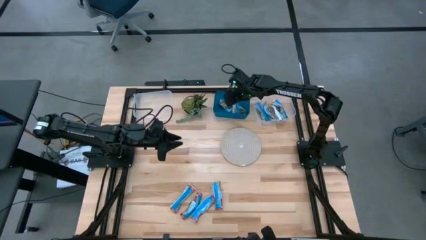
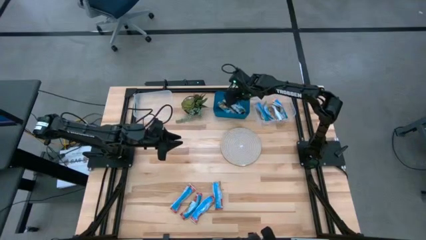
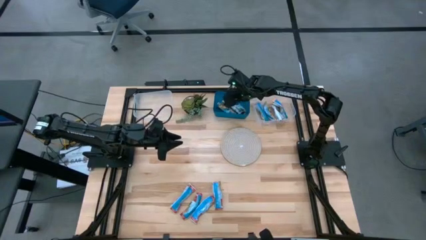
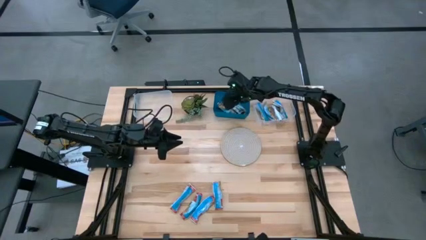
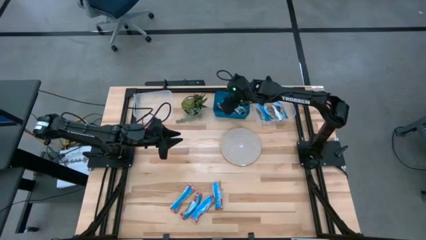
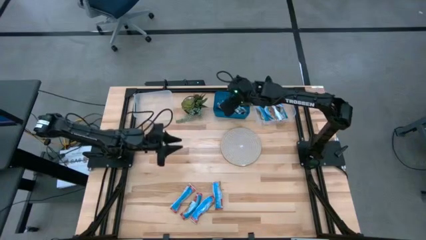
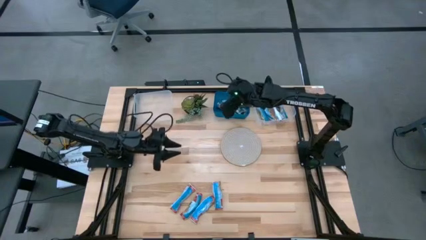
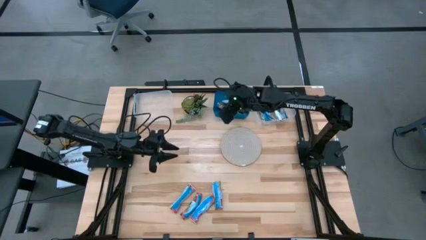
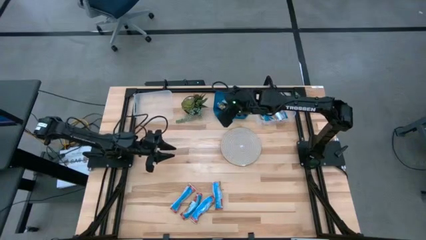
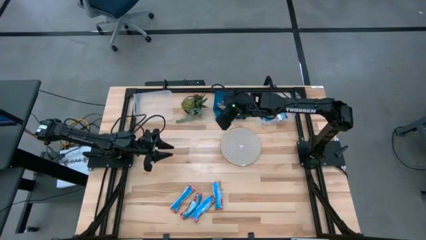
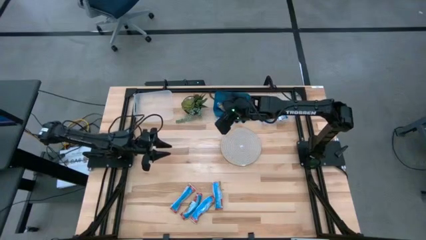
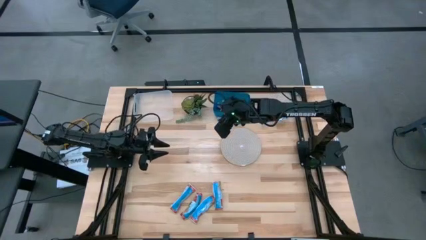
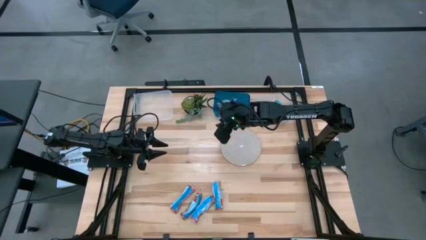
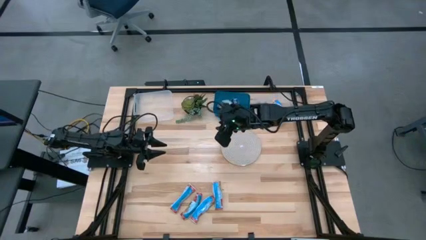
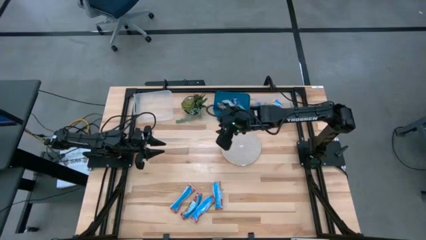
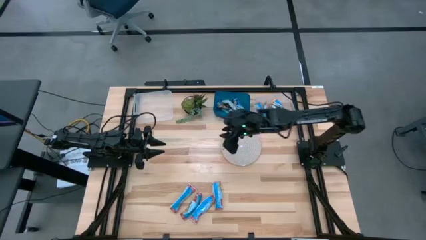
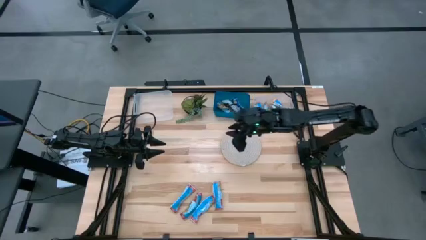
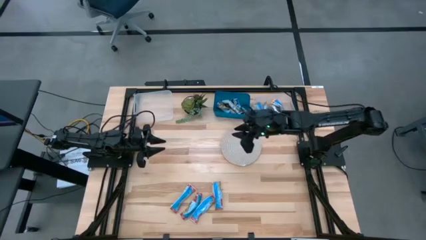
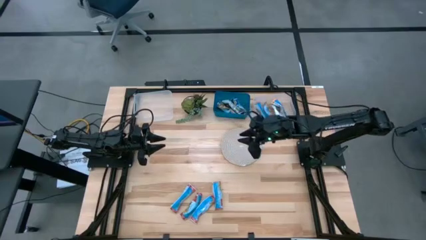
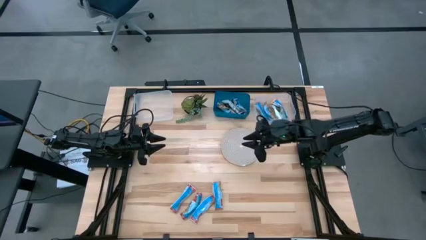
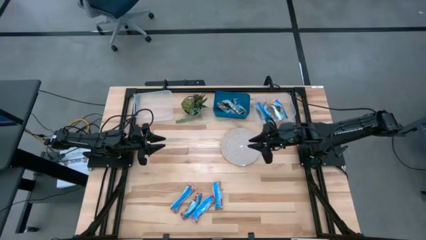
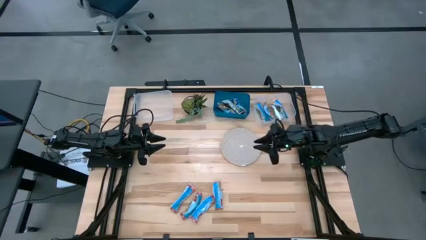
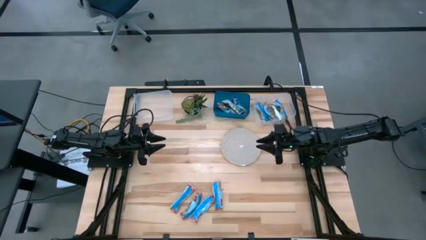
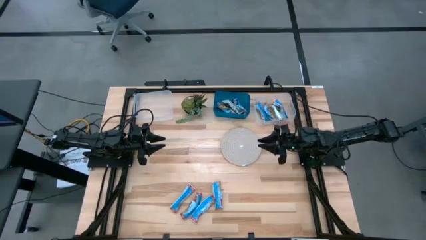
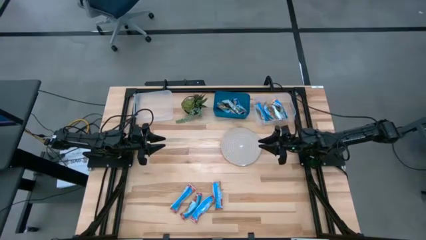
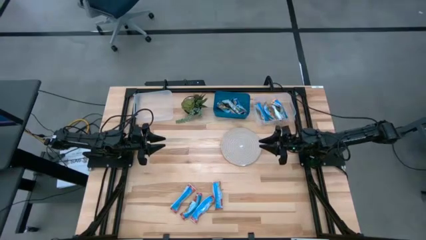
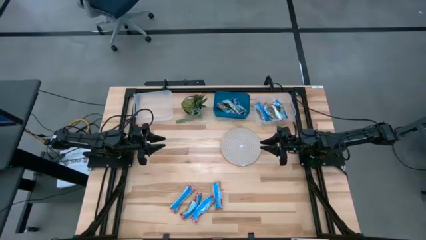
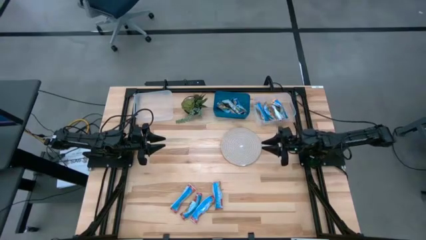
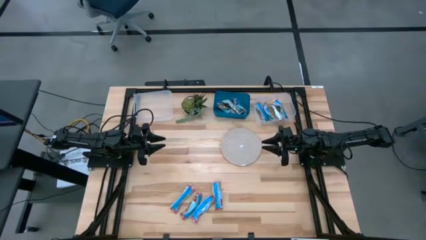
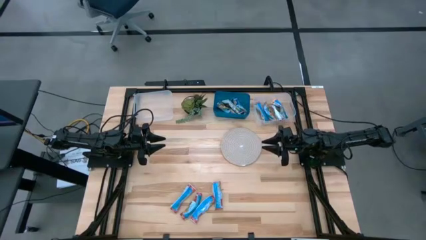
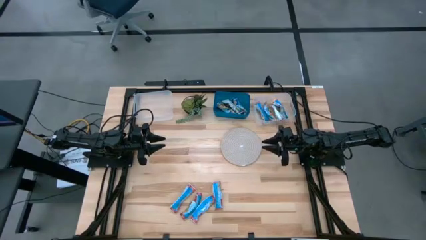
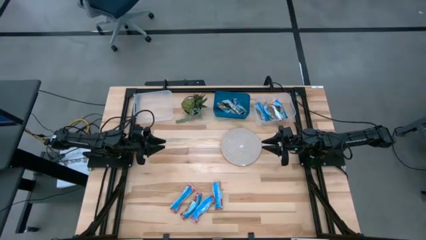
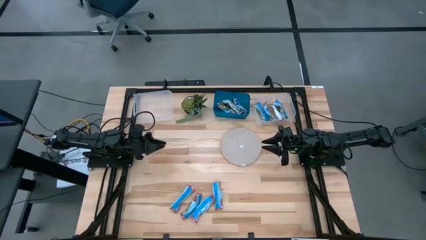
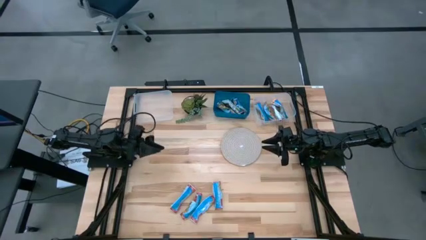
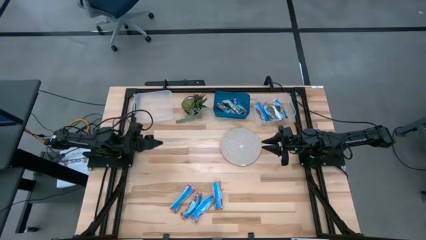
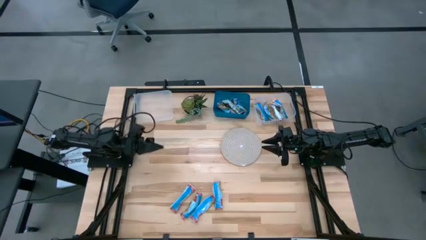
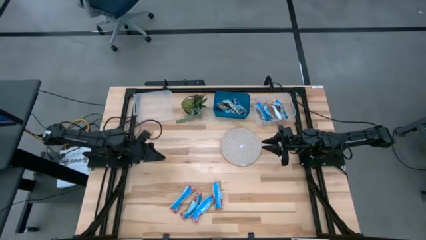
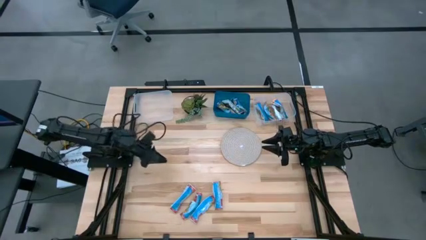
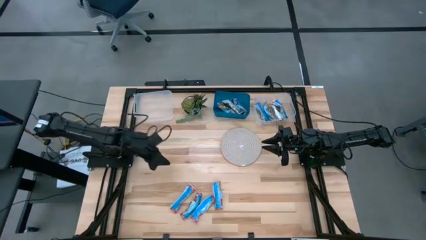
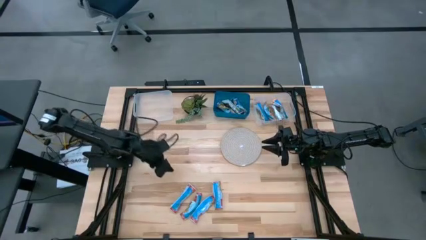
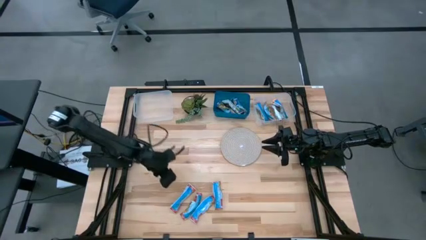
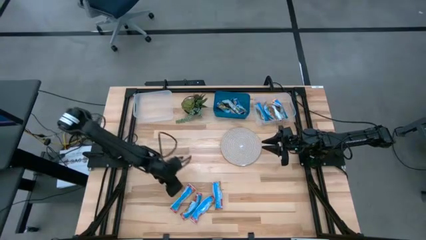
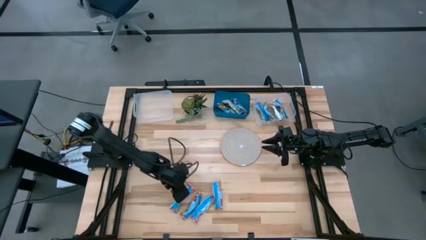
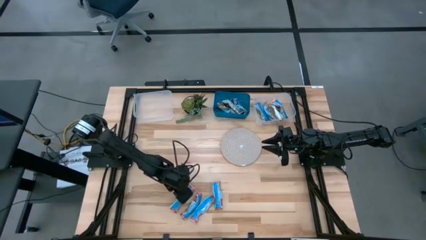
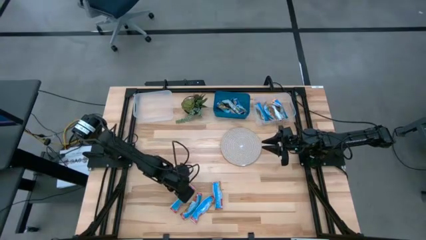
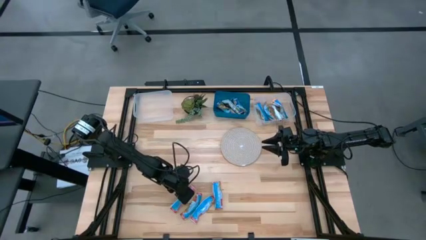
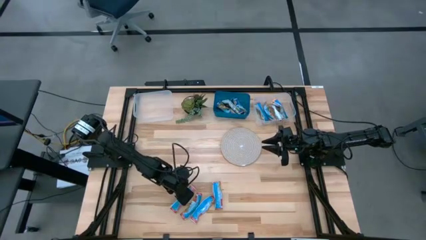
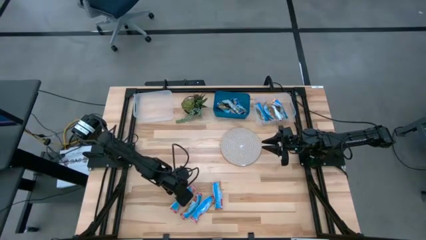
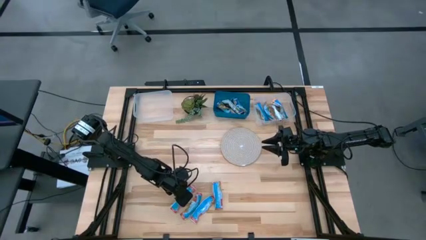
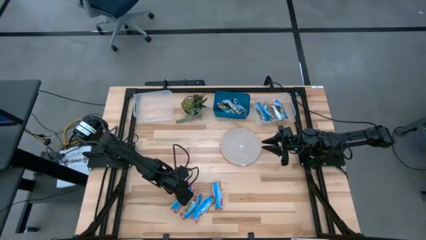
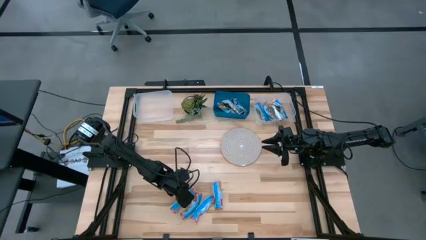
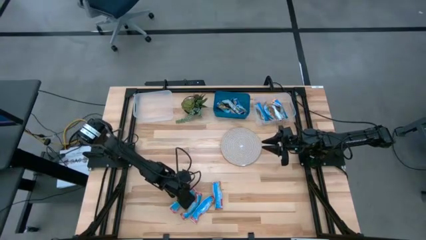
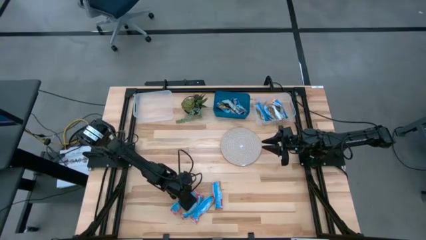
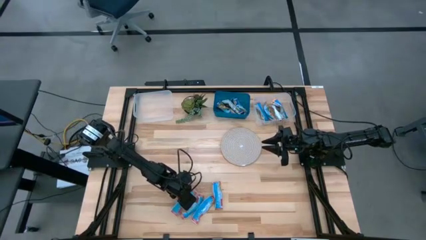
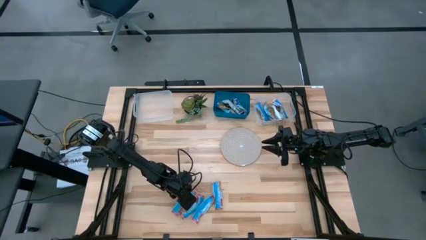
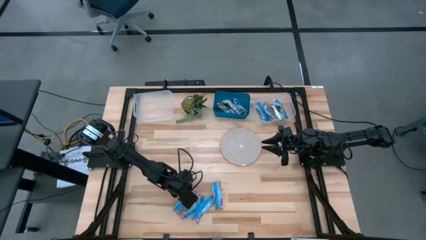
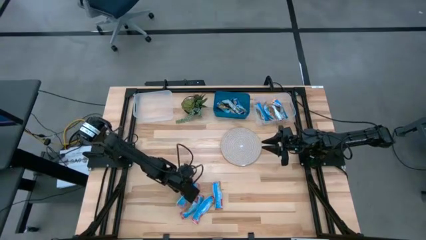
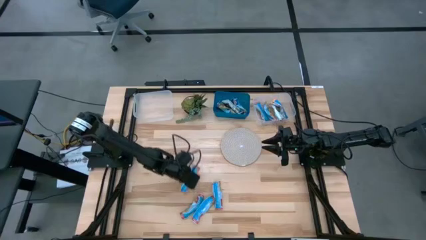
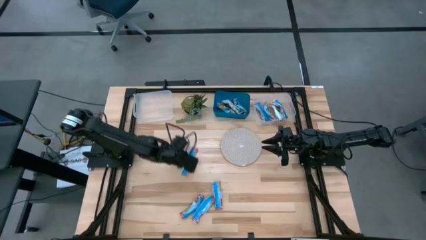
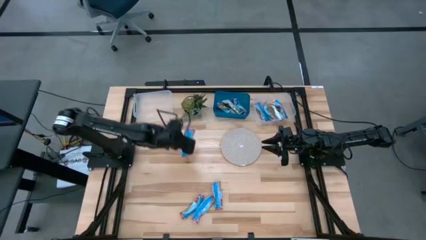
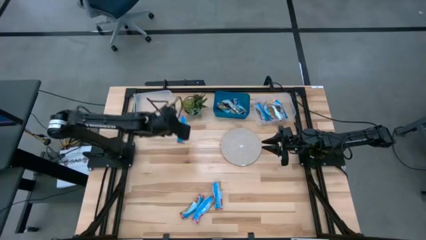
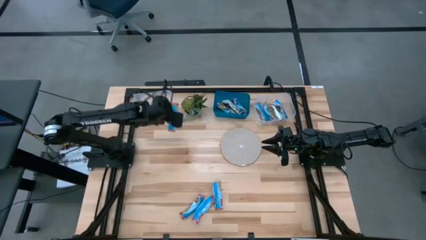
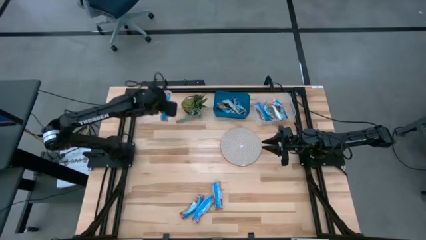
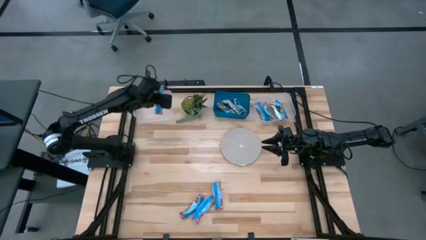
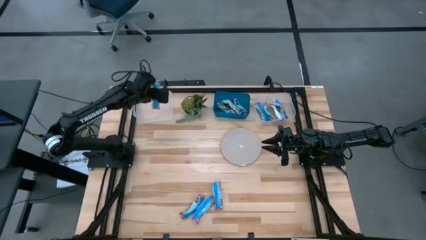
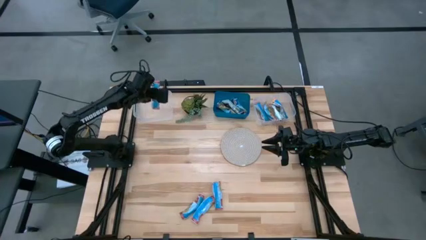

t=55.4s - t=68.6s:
Task: Pick and place Granola Bars by type
Put the red granola bar into the left transparent bin

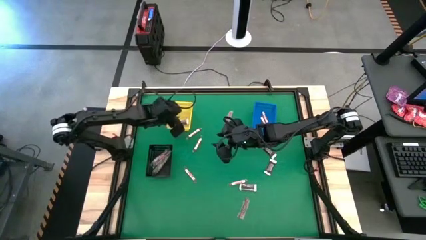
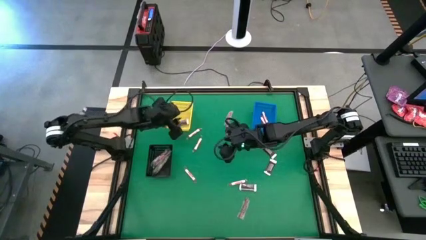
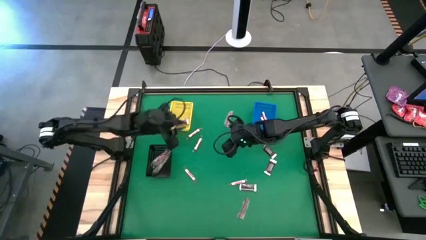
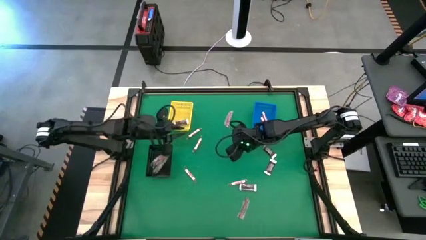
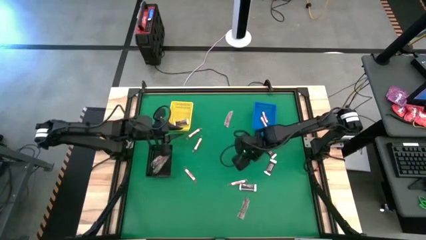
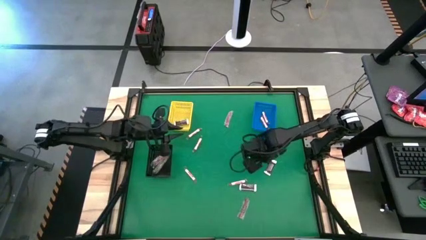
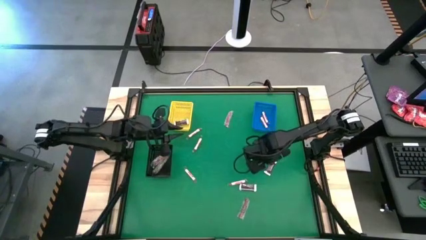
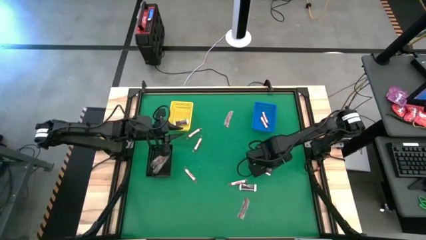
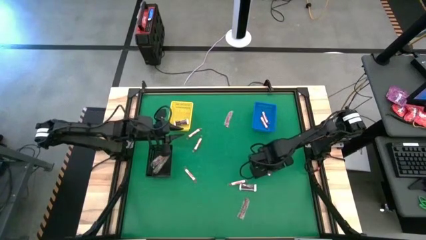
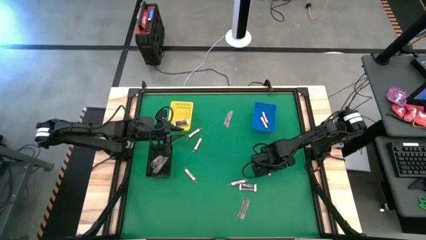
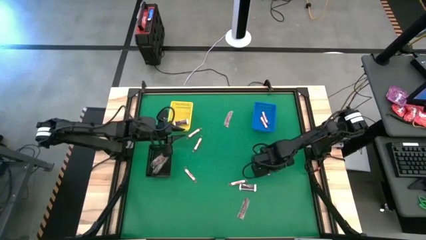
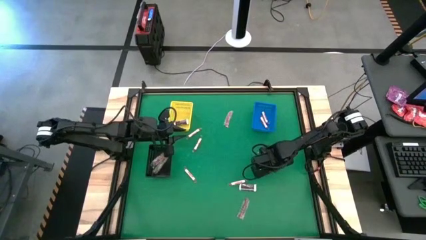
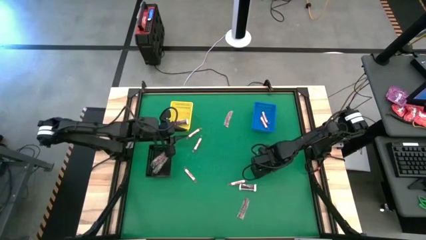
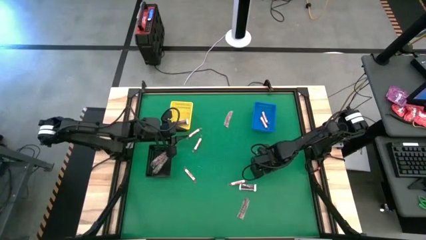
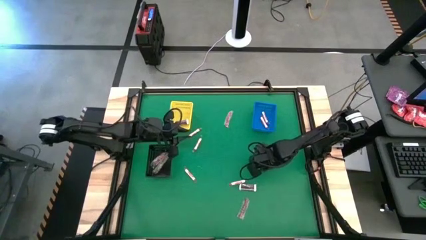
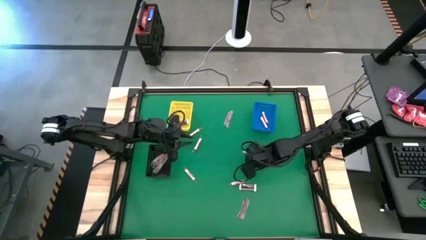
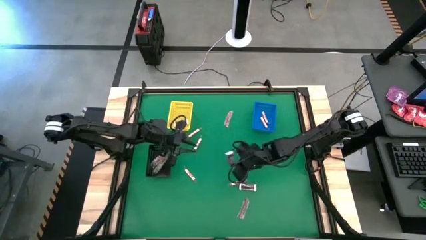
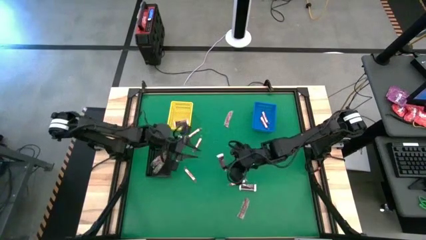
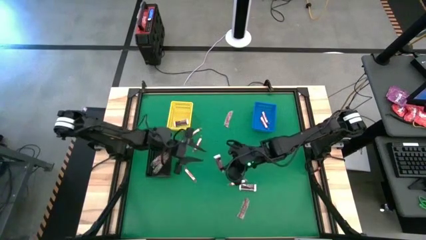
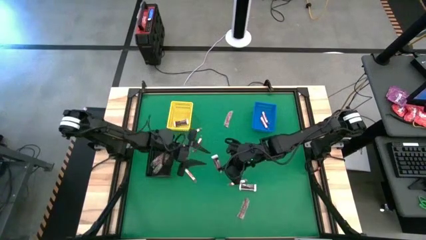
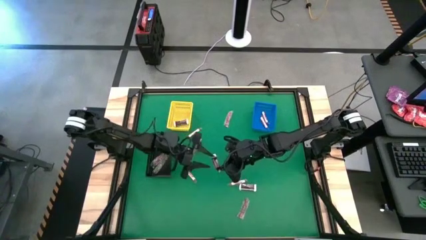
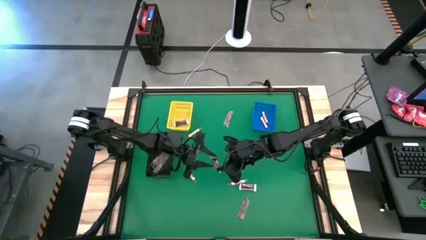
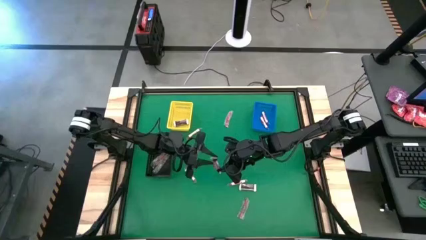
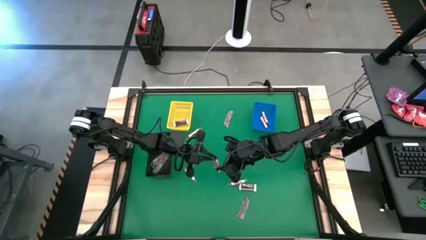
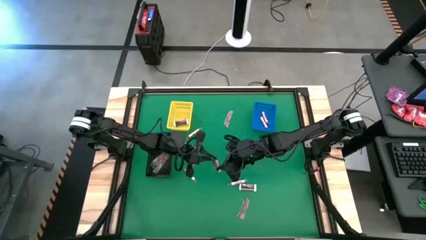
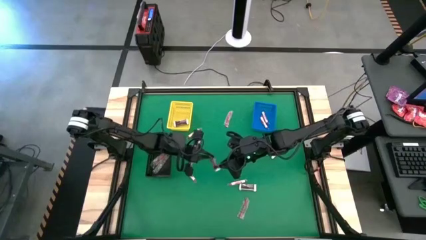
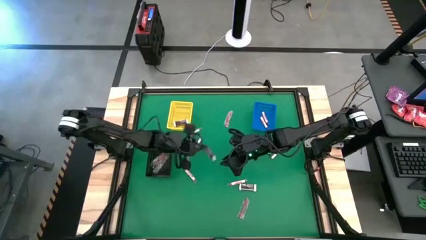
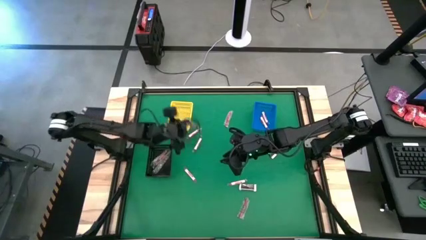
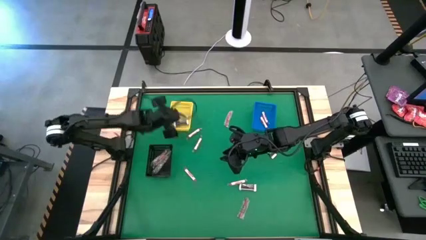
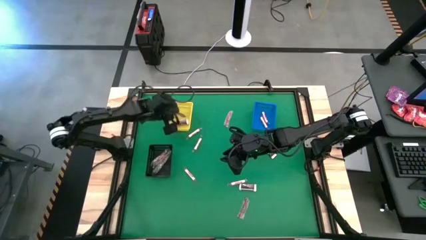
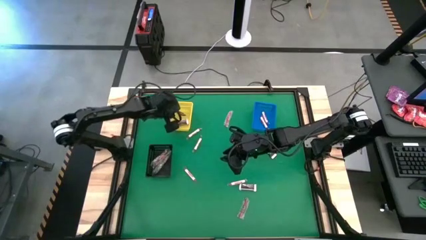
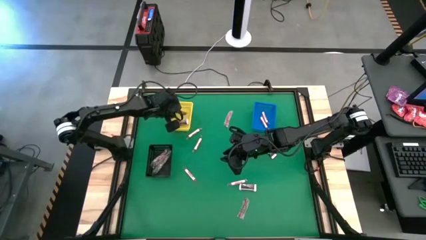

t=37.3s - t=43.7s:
Task: Sort candy by brand, put in halloween buckets
Put the brown chocolate into the yellow bin
